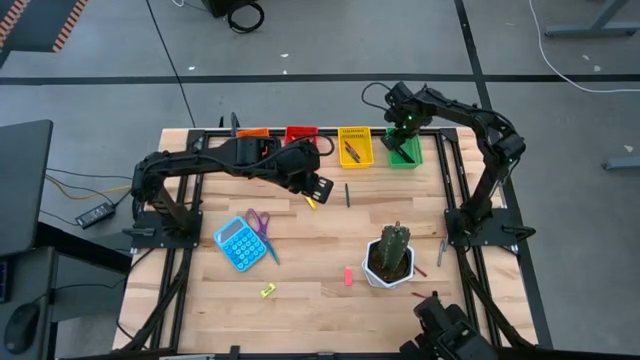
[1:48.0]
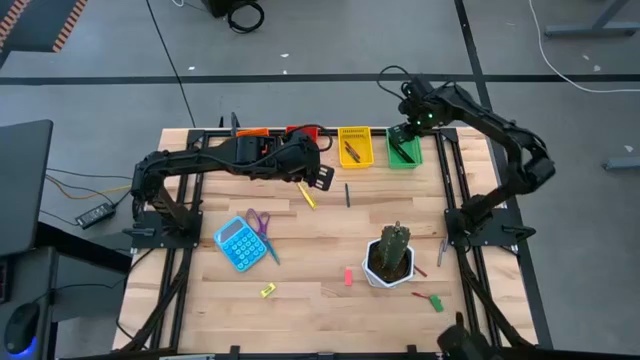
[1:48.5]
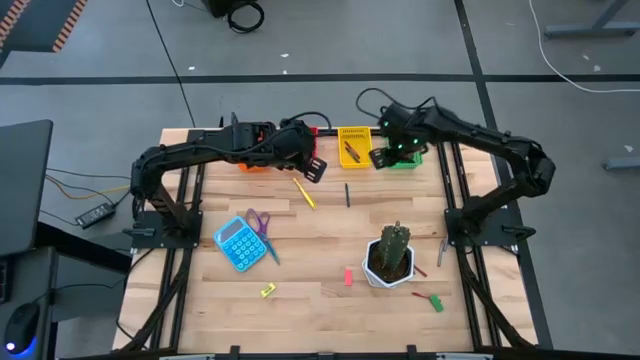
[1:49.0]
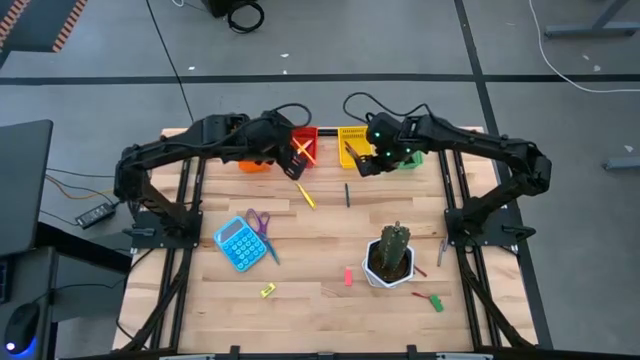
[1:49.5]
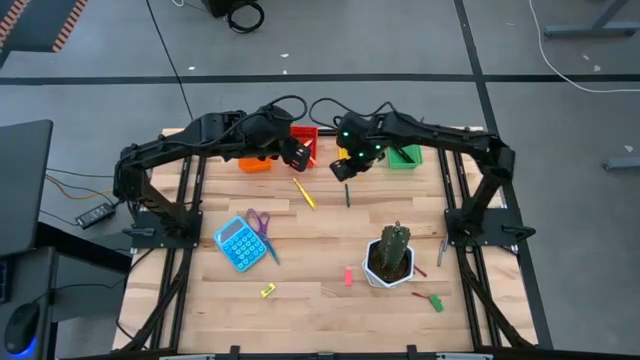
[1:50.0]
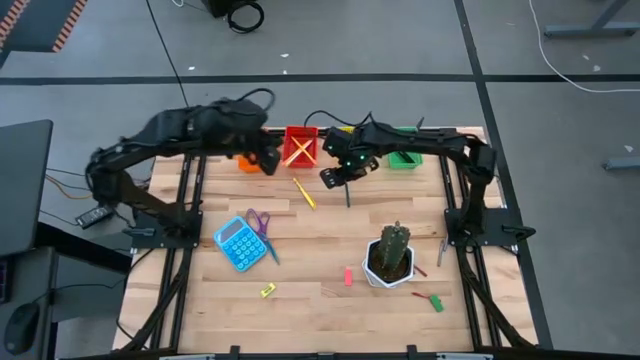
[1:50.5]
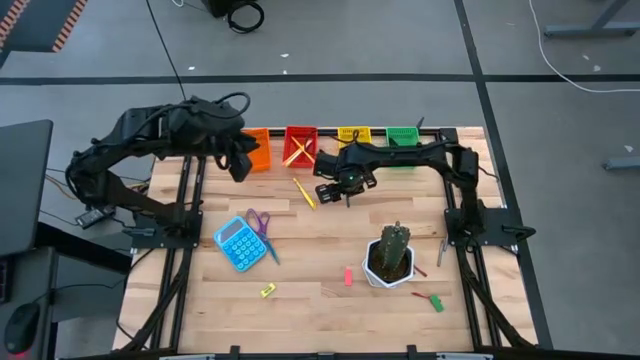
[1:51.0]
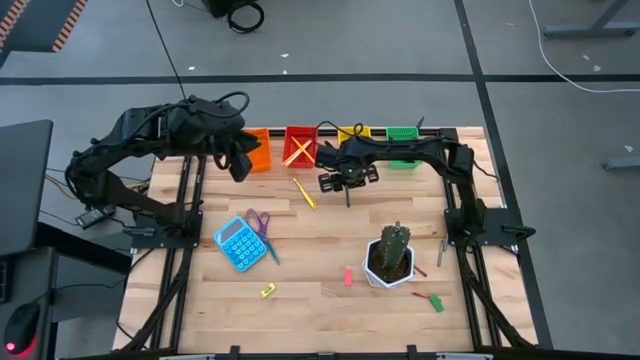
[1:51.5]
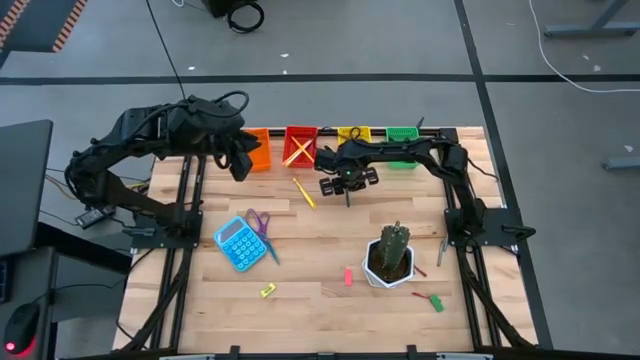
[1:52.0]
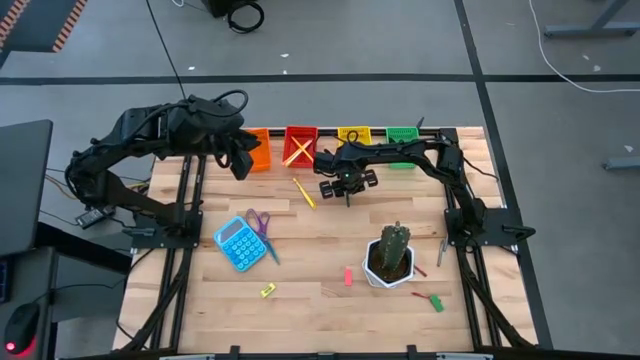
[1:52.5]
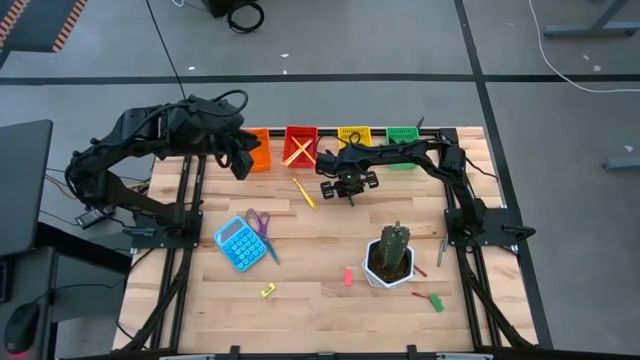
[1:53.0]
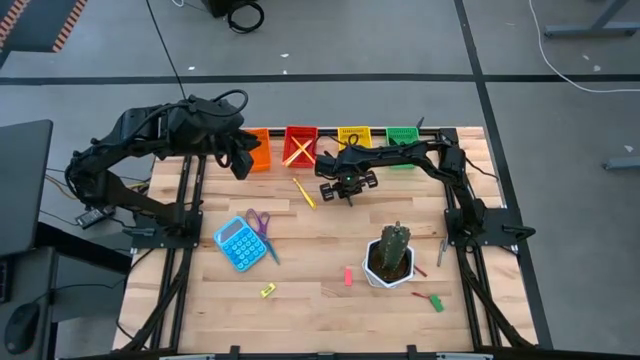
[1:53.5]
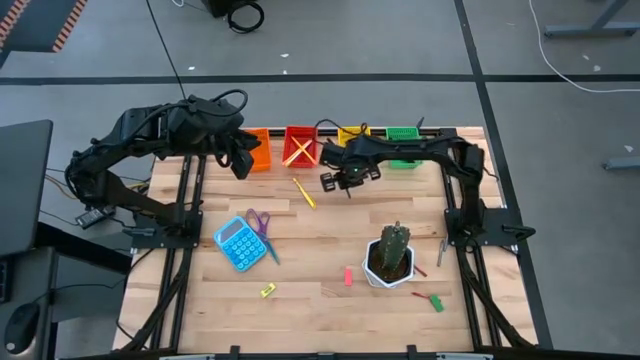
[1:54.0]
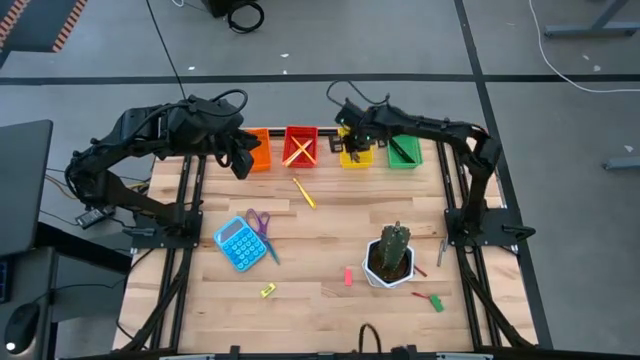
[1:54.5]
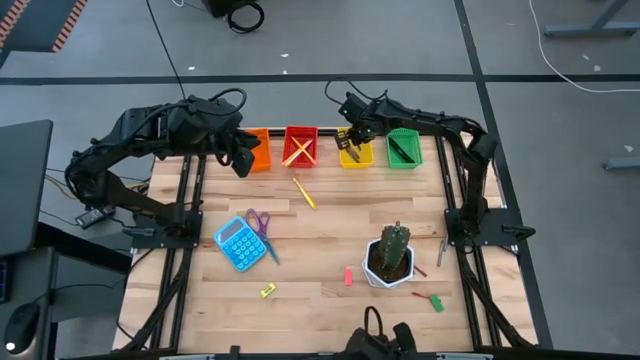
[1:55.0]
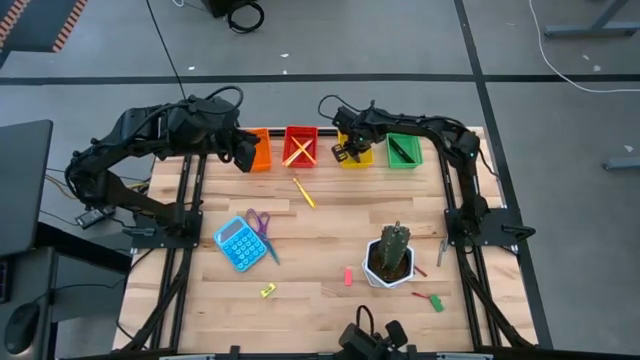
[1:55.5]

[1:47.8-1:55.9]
Task: Sort crayons/erasers/pens/pencils in bins
Put the green crayon into the yellow bin

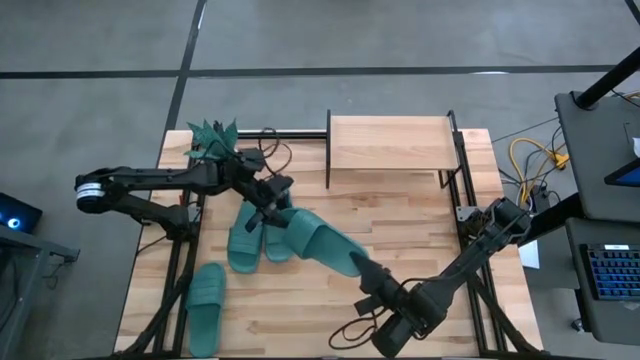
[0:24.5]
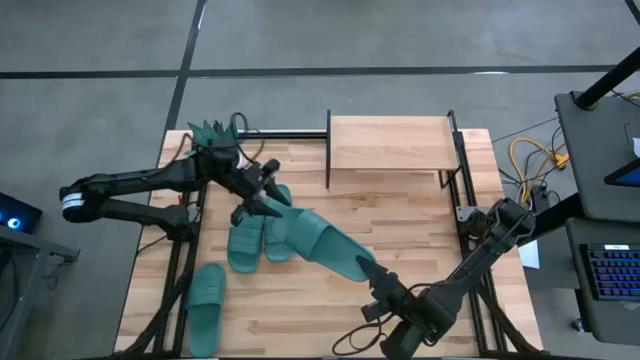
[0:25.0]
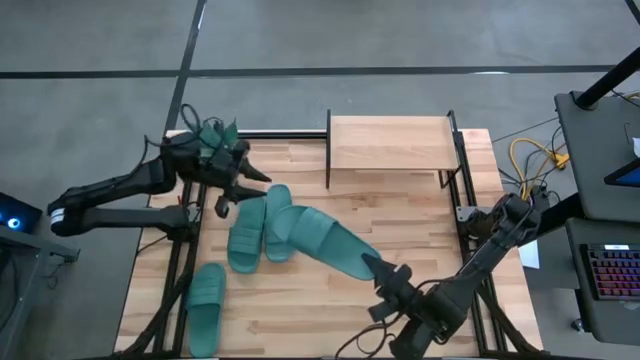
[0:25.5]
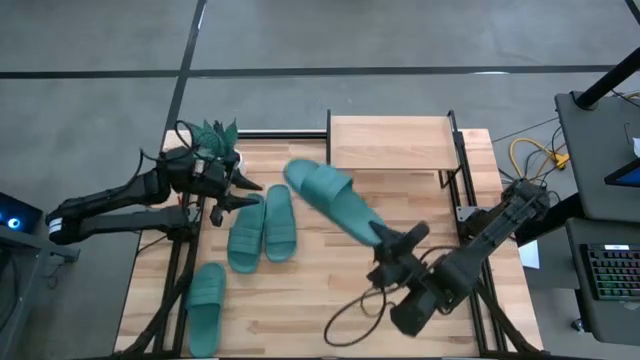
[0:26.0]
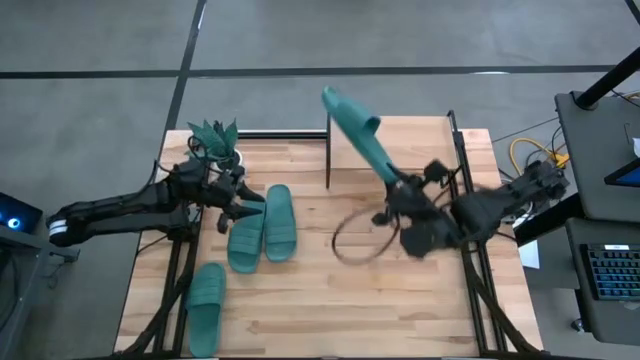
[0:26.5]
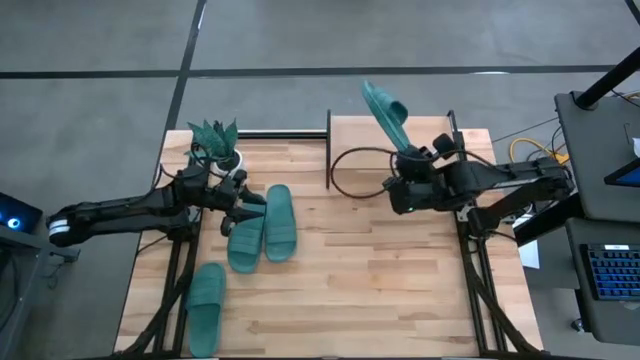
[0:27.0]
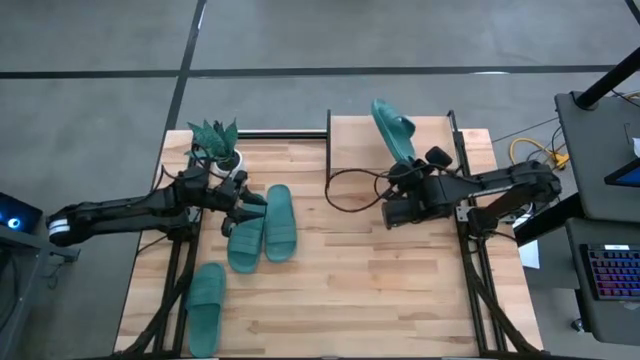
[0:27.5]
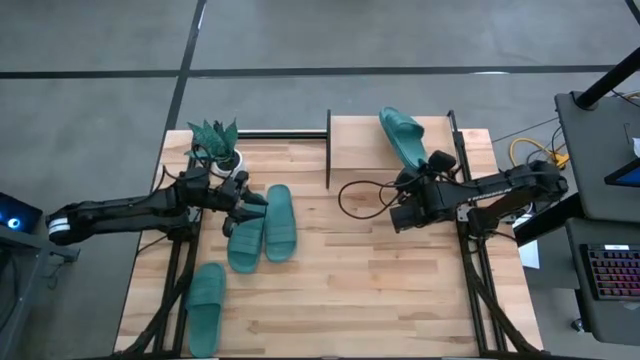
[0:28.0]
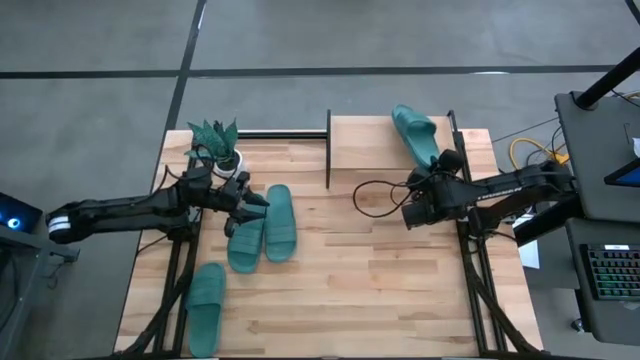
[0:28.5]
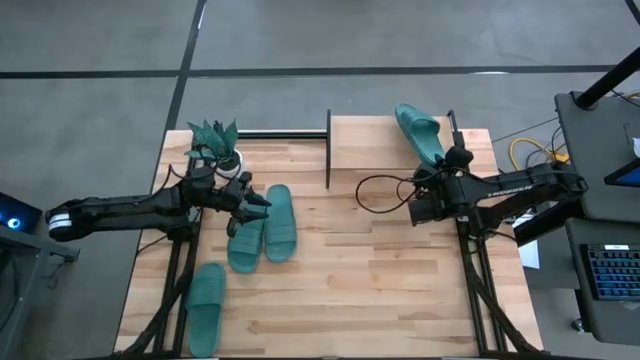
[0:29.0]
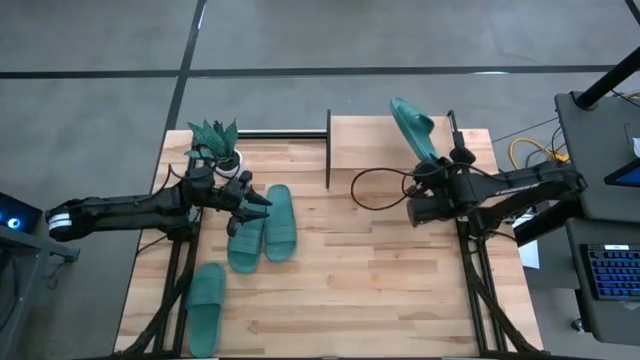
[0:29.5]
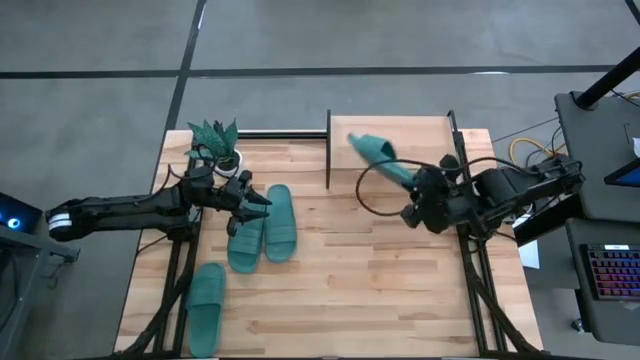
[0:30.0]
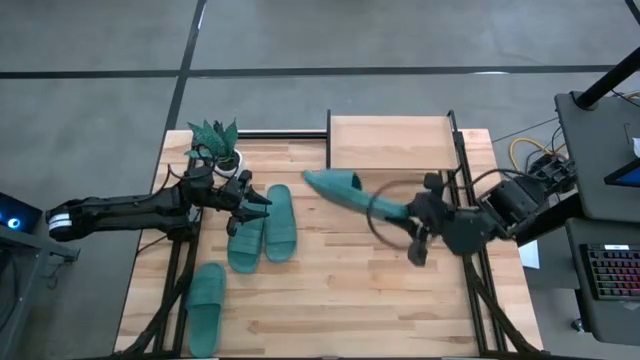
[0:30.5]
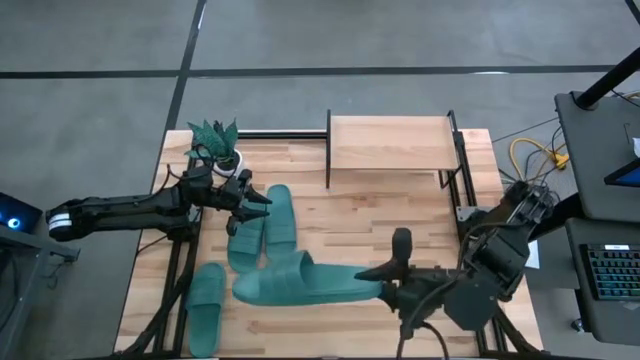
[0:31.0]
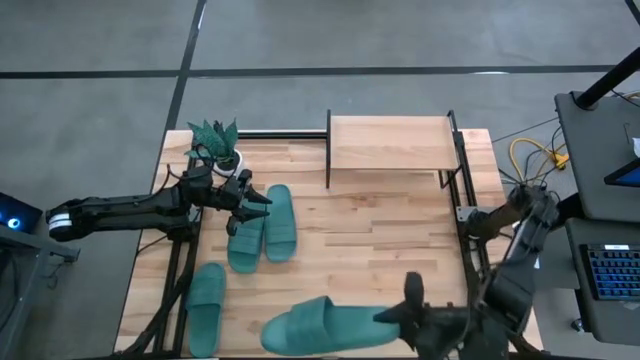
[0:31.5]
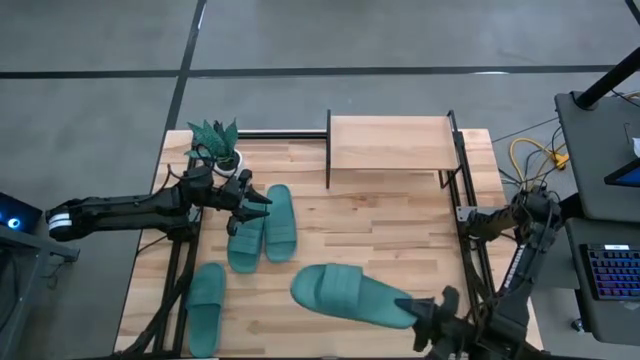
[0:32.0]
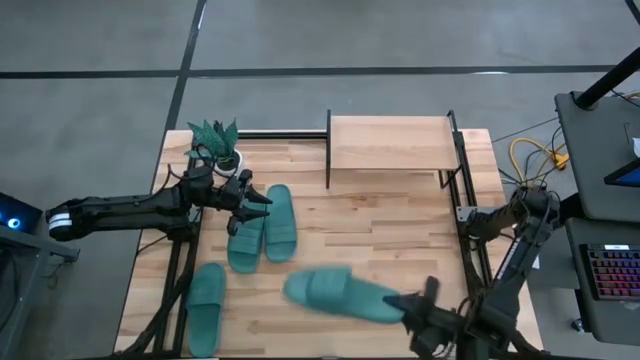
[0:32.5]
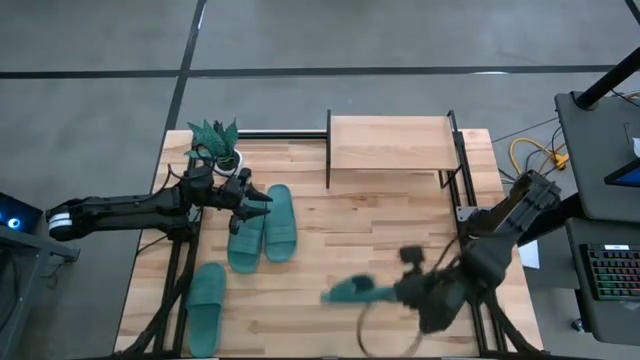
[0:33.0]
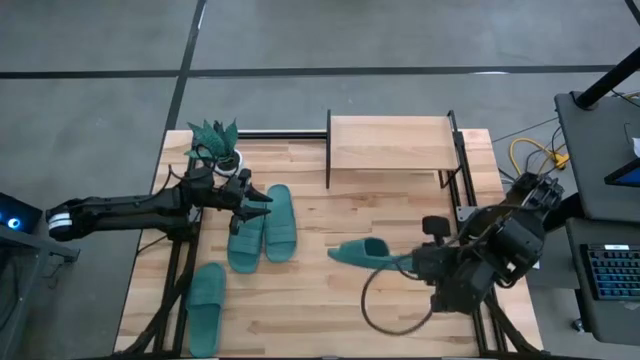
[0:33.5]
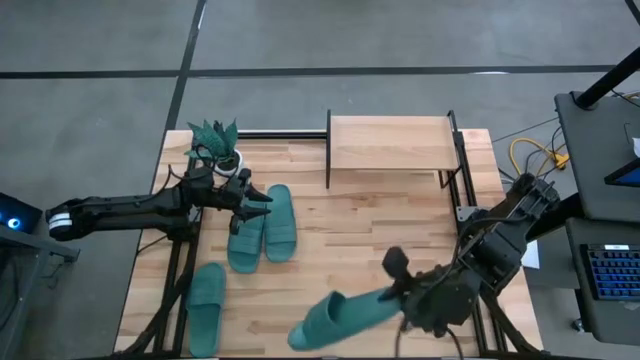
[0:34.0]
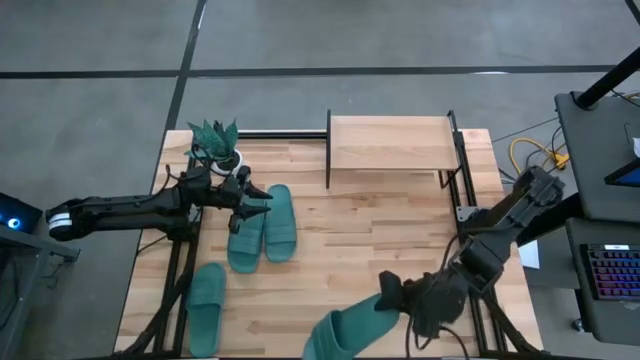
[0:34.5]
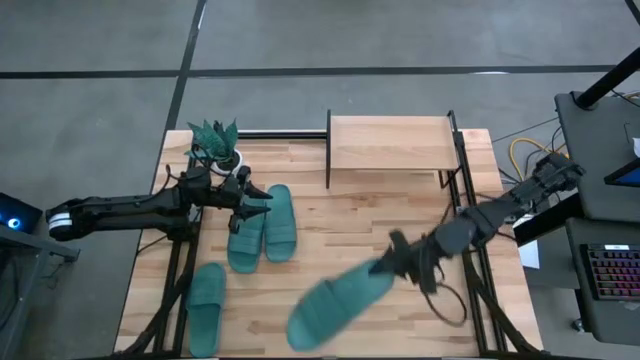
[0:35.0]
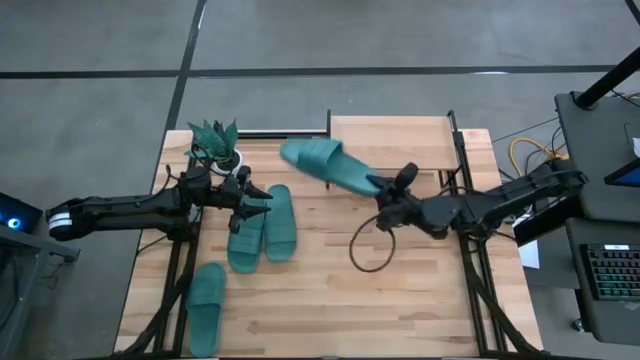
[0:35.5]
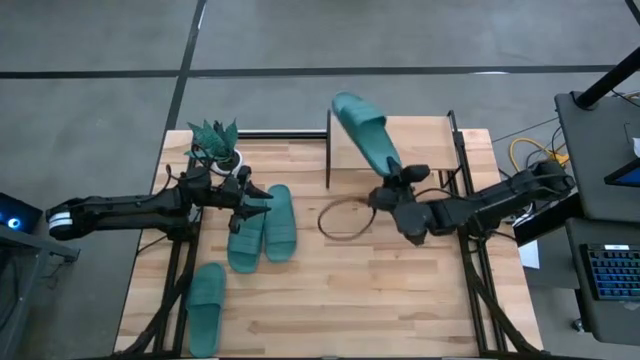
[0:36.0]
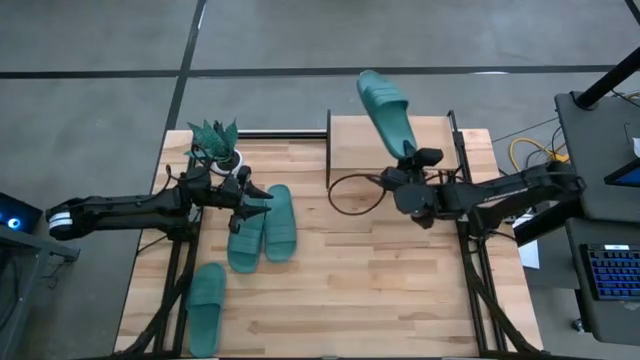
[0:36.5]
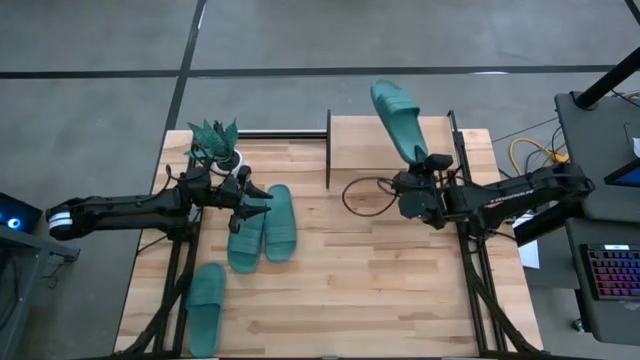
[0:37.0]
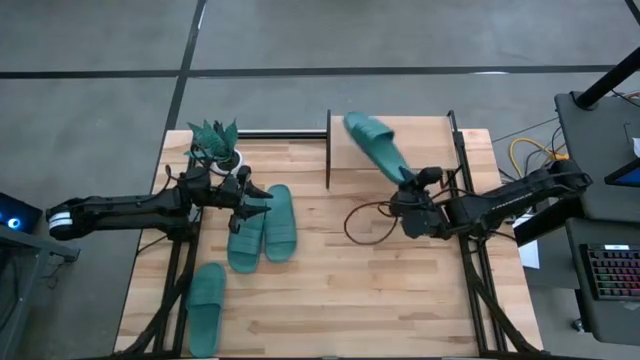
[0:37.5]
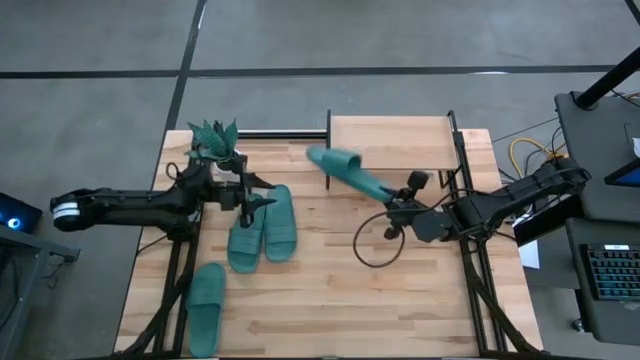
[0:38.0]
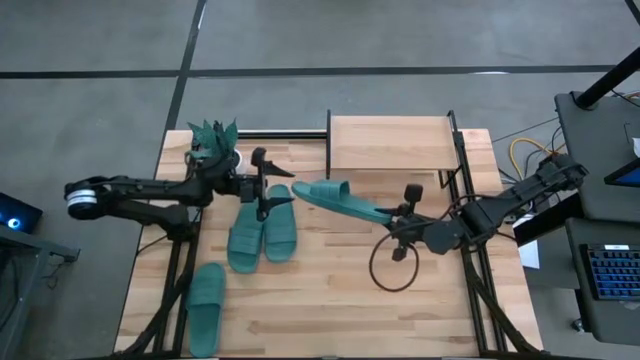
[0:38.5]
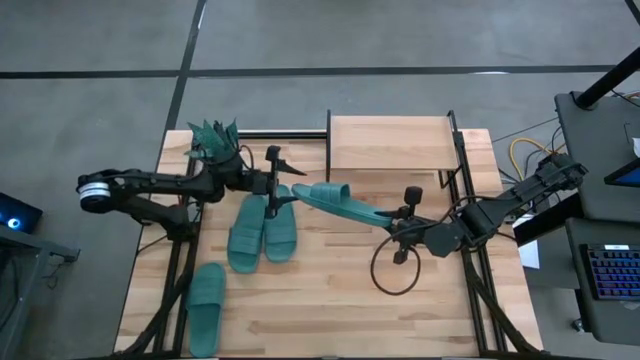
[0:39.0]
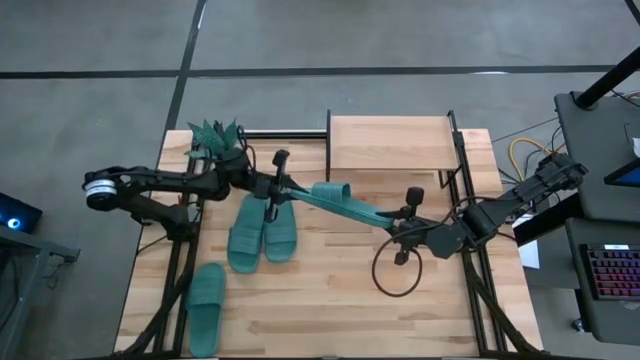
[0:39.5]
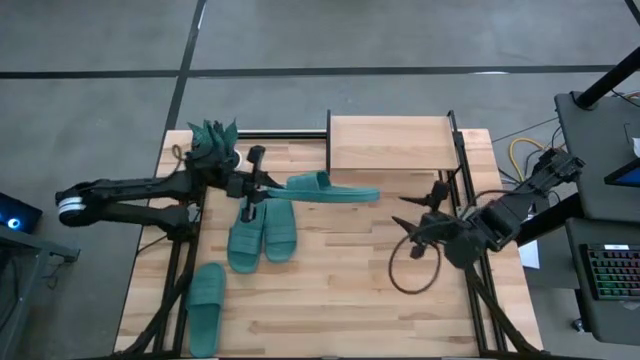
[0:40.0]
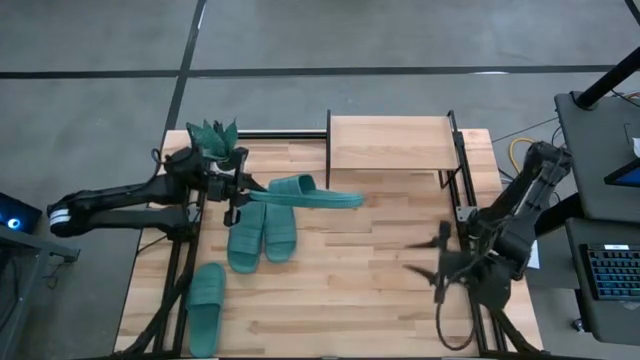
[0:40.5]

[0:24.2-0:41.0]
Task: Pick and place slides into the shelf
Put the bottom right green slipper on the shelf
